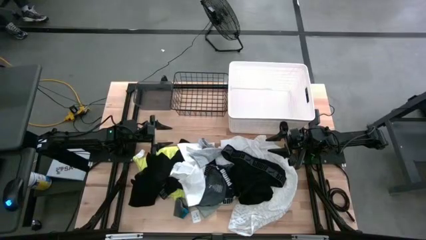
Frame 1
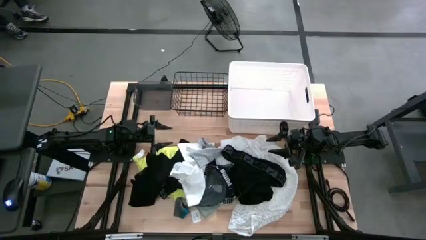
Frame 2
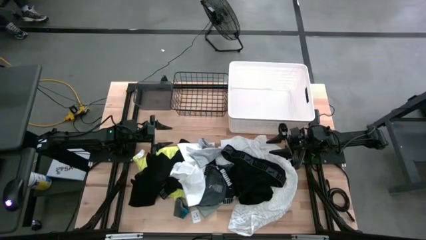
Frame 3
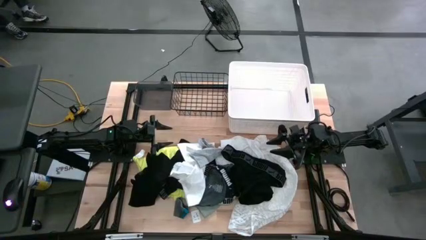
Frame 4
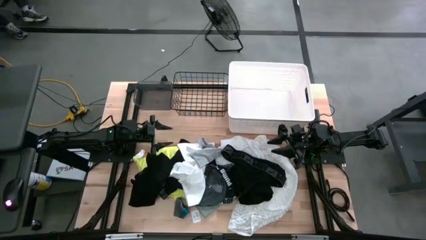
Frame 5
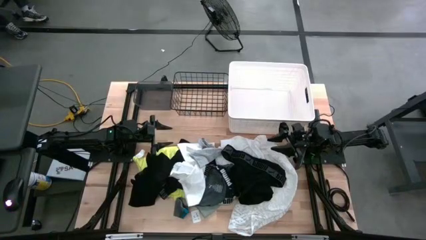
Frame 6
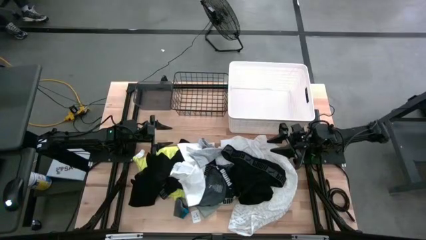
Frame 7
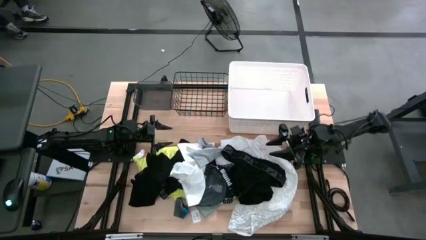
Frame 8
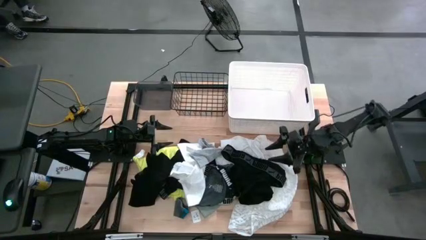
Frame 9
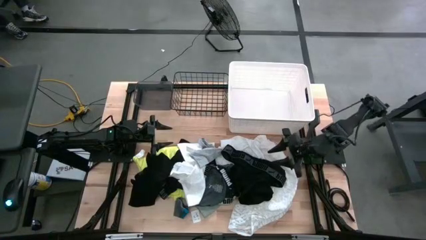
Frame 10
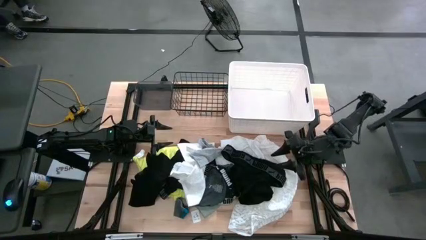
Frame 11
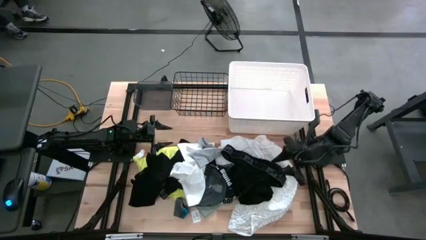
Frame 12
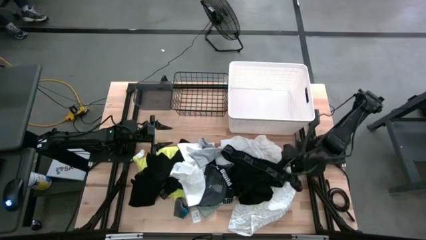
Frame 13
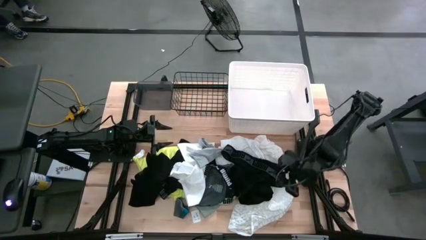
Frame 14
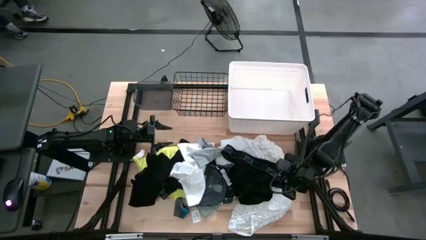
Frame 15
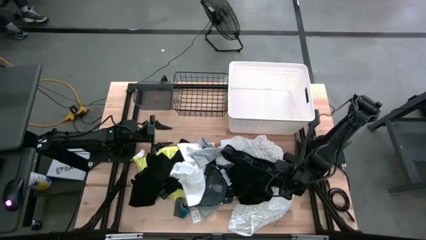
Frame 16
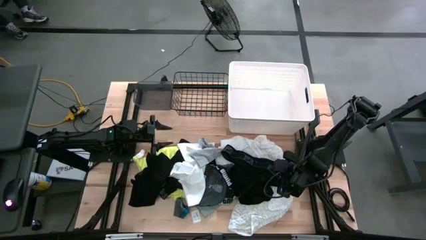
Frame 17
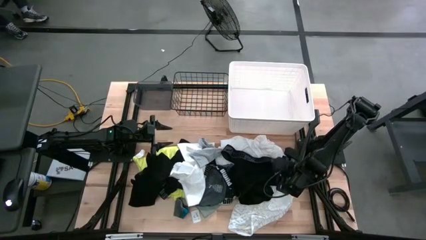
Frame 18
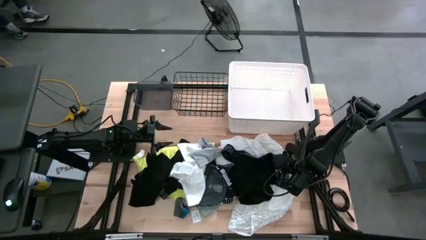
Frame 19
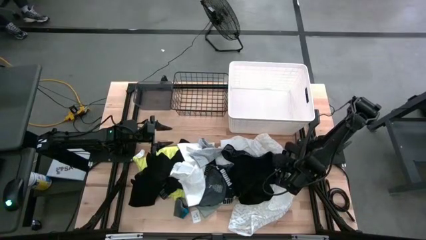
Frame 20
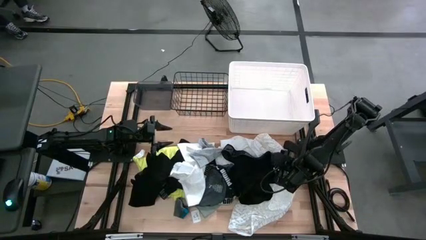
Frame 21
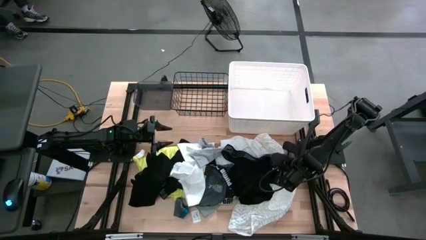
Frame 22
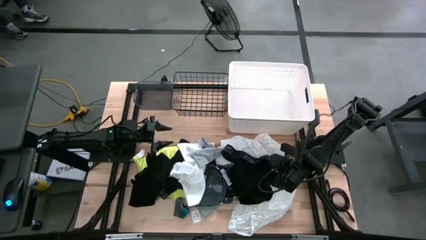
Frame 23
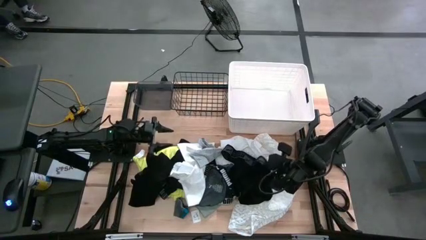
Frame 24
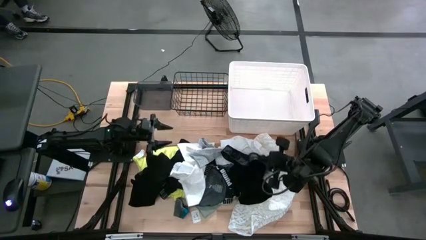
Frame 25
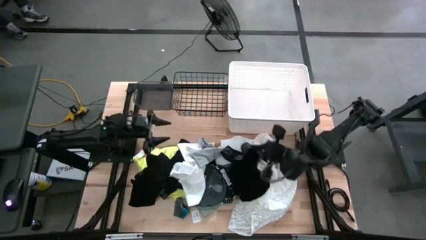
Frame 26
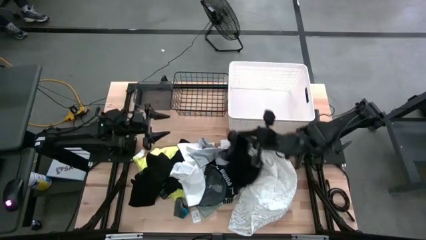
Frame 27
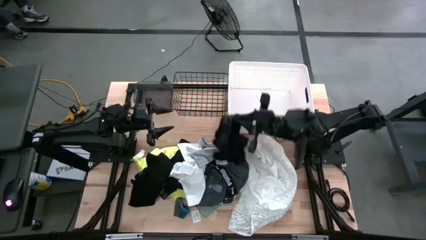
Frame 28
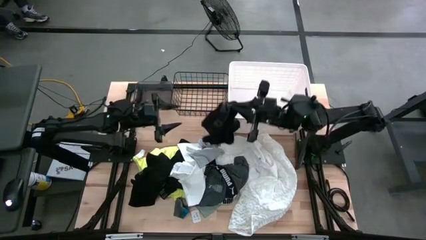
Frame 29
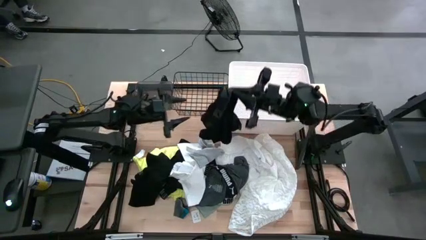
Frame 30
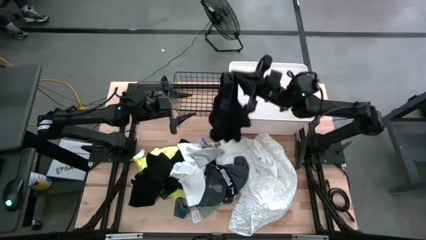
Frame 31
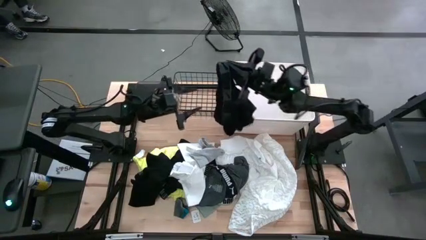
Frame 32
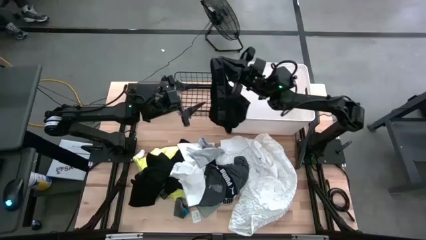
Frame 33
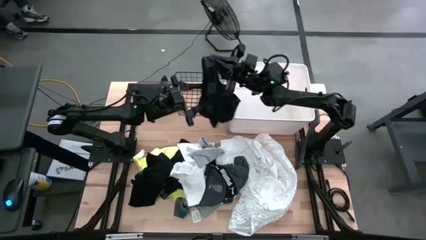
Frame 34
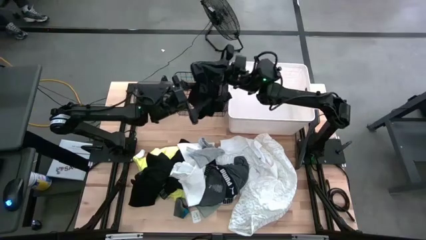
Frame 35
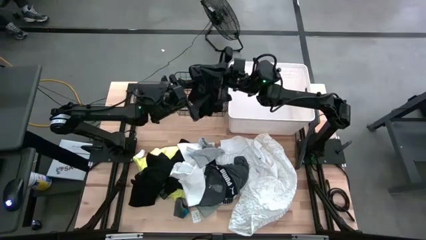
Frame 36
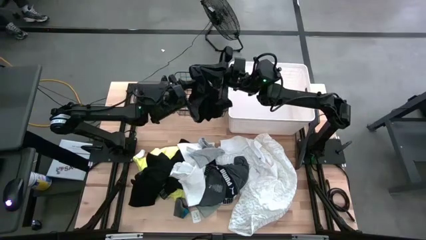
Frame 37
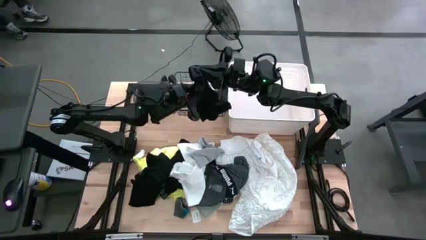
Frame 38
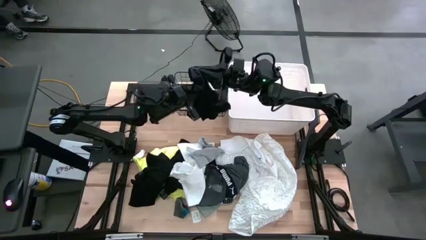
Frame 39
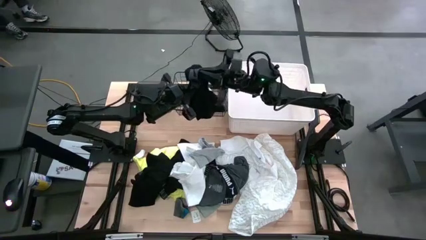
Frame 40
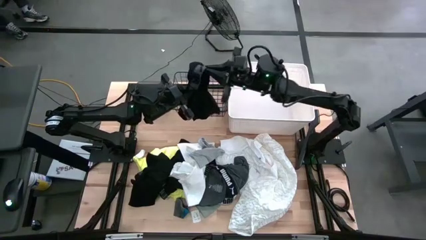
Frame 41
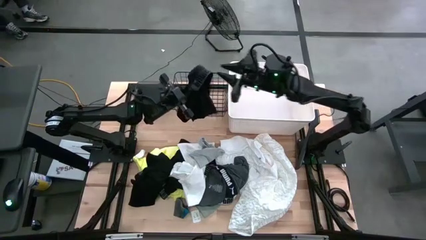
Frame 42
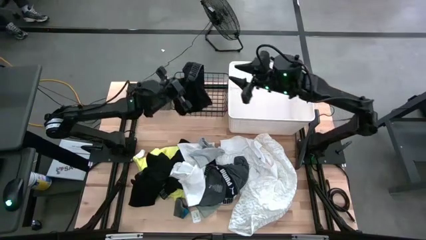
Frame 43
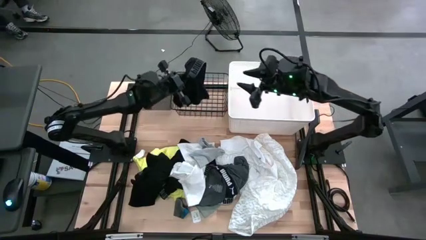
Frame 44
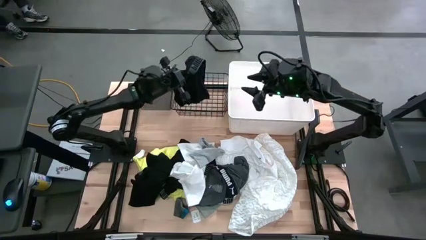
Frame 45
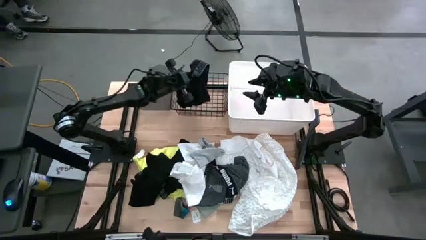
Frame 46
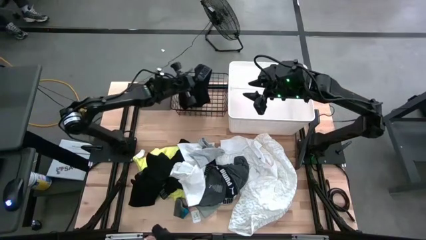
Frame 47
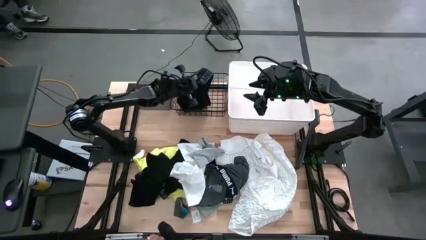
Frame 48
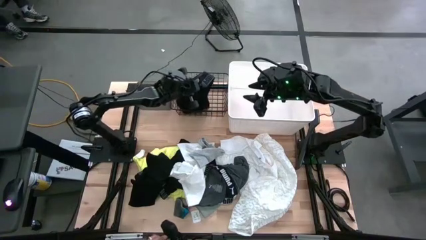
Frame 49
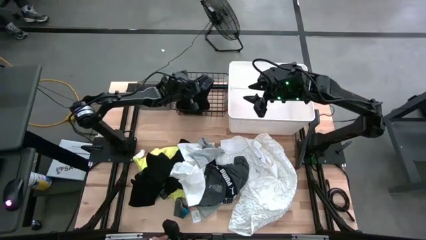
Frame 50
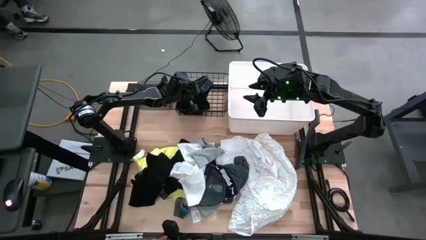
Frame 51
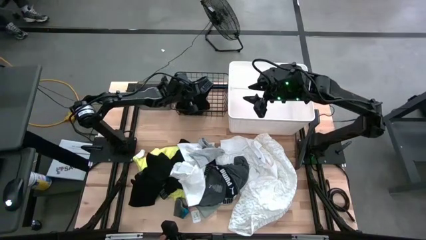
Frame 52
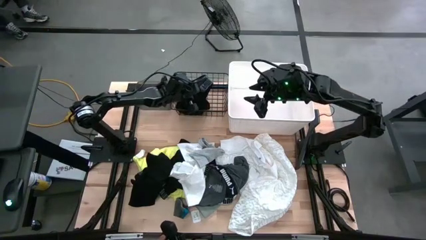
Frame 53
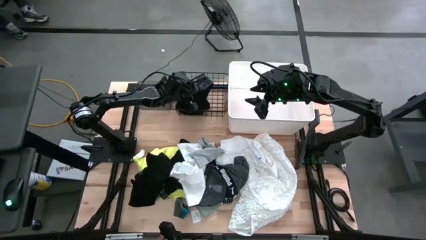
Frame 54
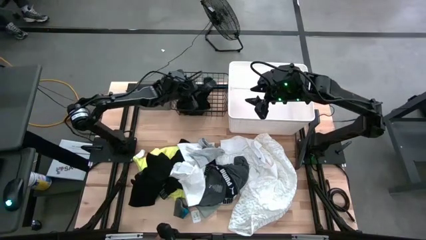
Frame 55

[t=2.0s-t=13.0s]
Task: Pick & Place Cloths
Put the black underwear into the wire basket

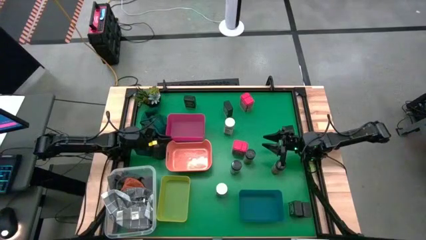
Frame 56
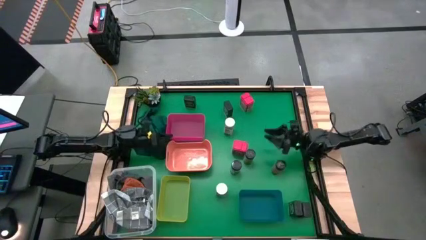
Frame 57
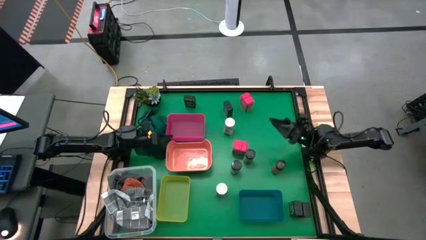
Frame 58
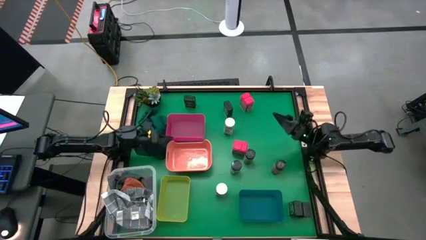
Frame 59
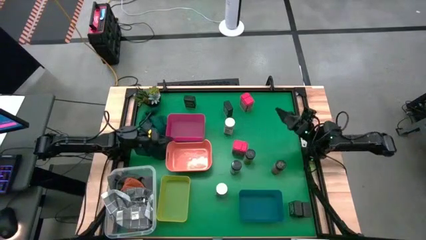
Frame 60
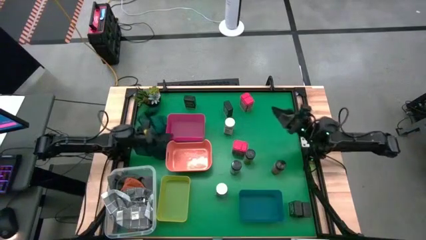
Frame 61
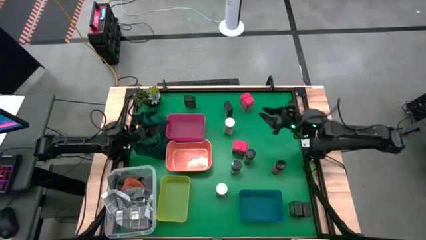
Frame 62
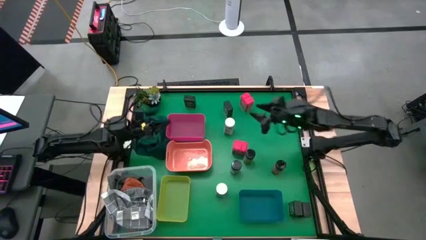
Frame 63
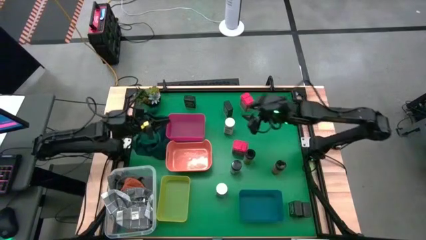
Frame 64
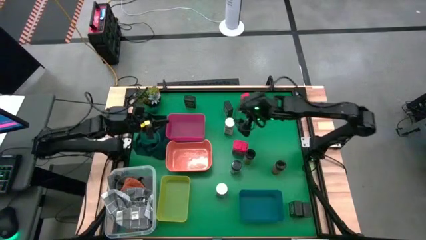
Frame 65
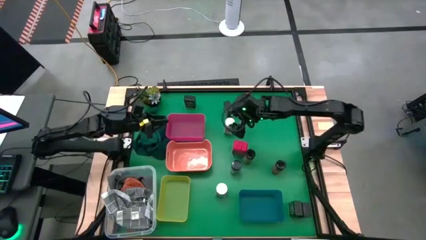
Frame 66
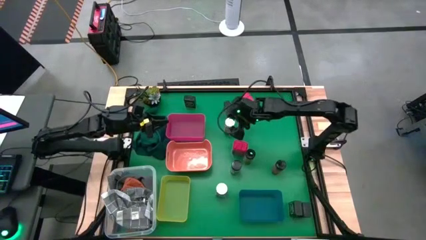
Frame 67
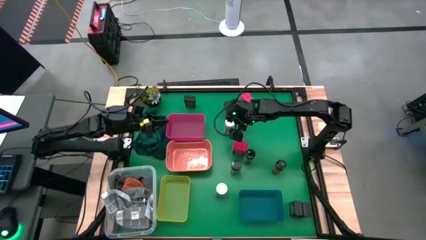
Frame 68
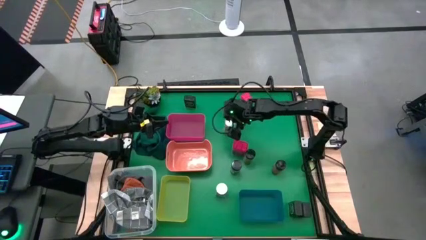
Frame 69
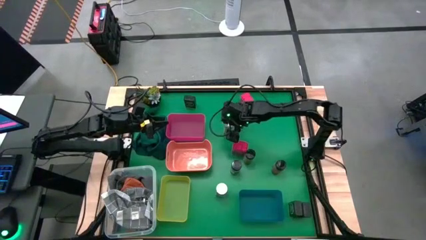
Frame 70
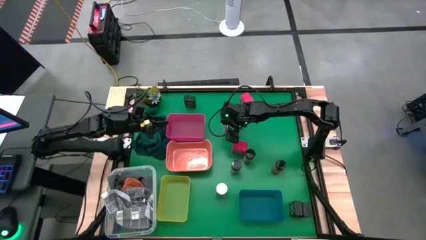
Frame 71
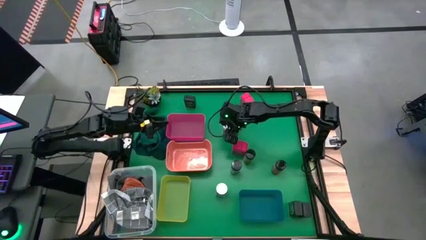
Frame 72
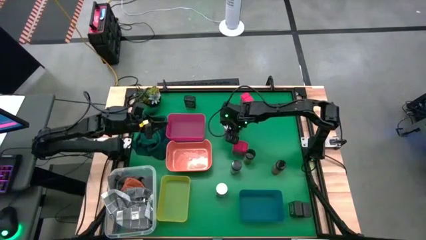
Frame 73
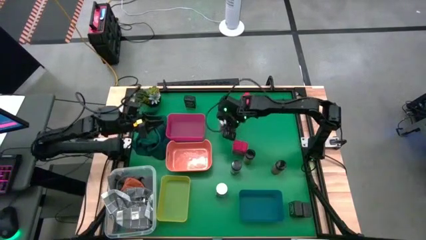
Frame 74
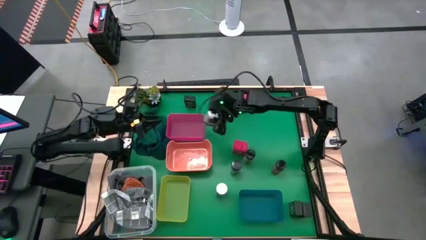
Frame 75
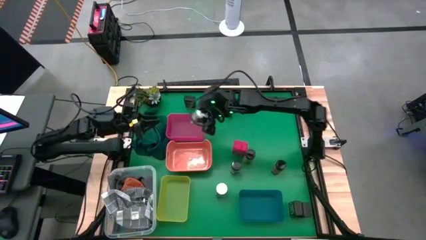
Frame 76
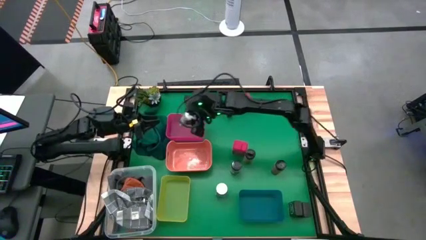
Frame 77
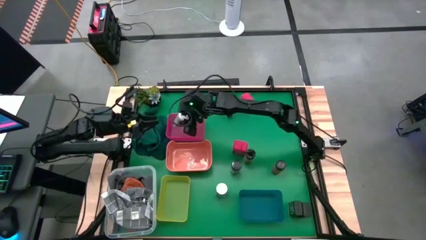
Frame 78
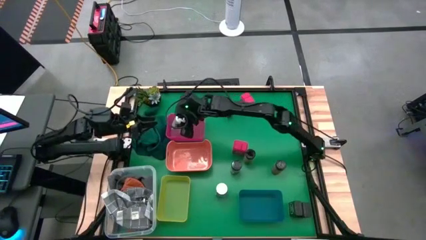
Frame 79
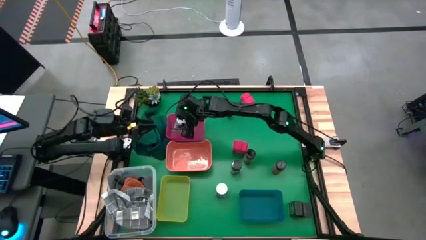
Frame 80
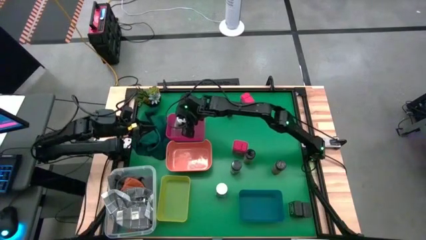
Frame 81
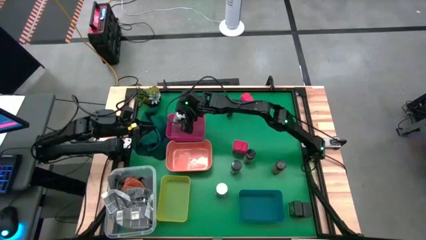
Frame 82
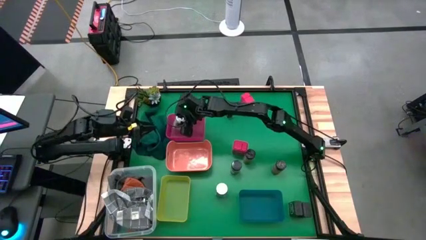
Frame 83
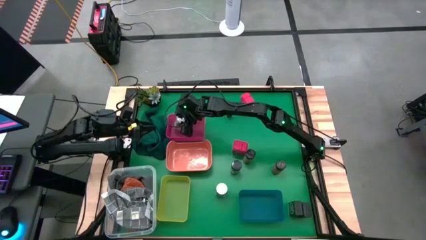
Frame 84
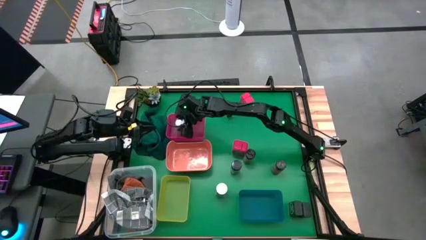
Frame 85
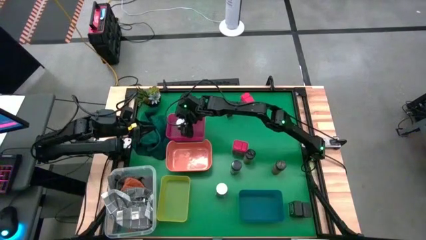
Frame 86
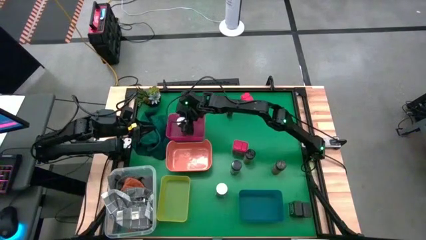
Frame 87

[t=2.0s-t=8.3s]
Task: Sort spices by type
Put the top white seasoning bottle into the red bin
